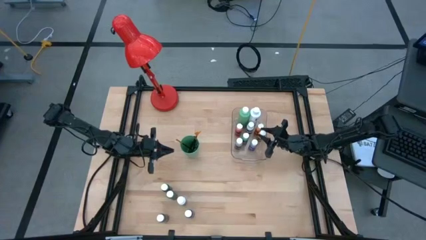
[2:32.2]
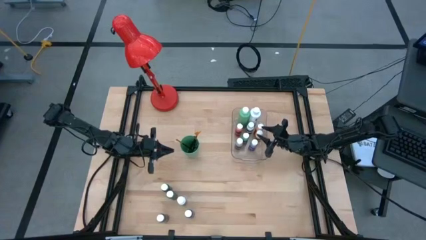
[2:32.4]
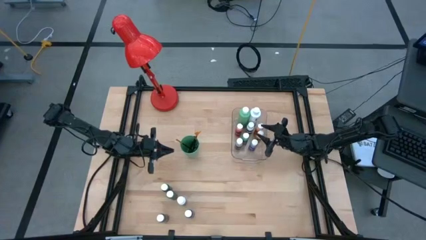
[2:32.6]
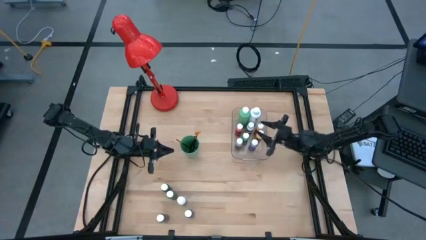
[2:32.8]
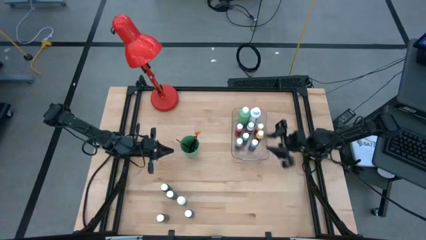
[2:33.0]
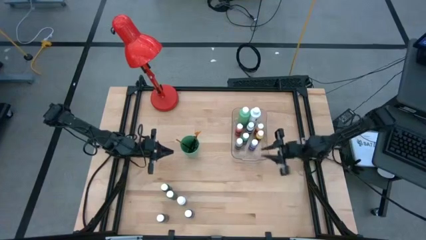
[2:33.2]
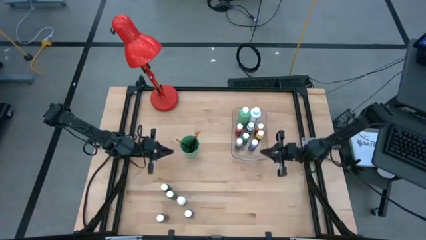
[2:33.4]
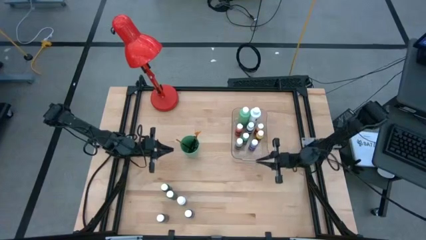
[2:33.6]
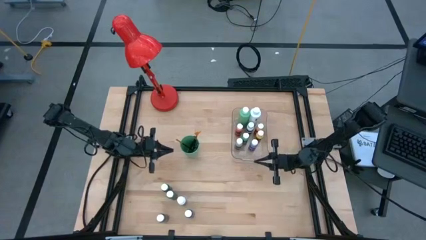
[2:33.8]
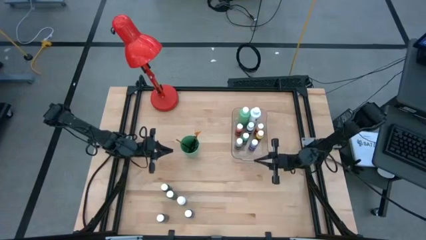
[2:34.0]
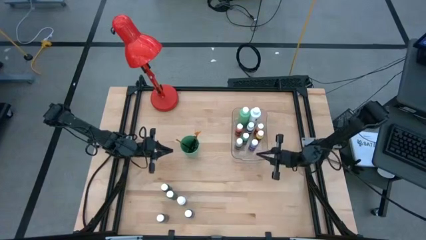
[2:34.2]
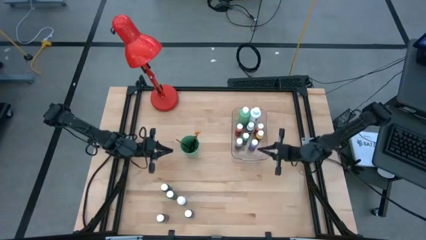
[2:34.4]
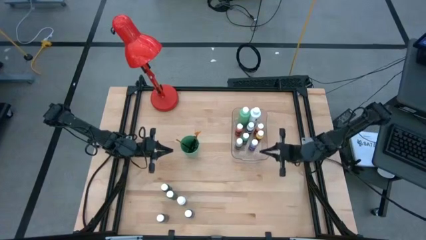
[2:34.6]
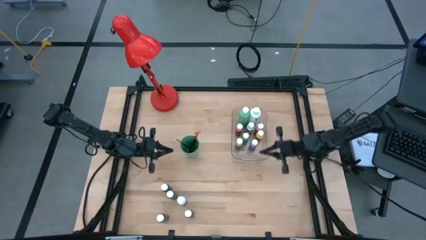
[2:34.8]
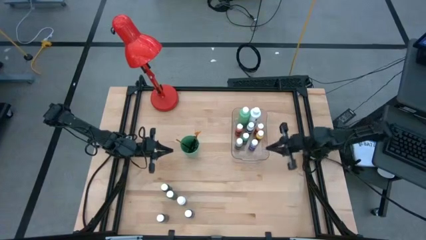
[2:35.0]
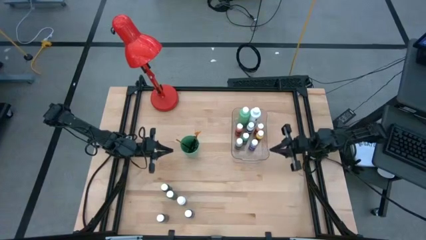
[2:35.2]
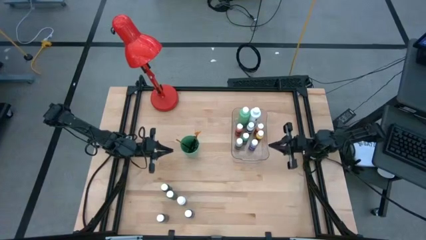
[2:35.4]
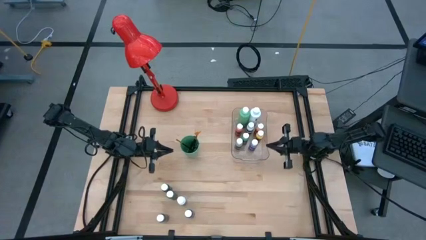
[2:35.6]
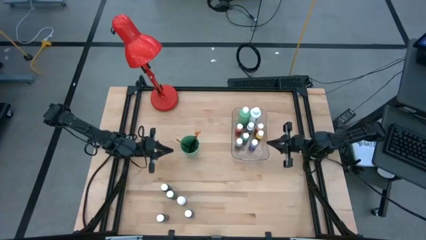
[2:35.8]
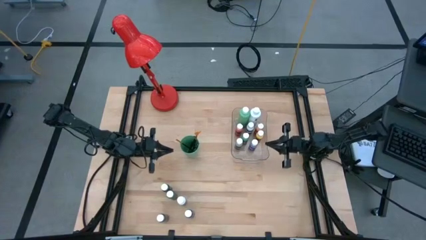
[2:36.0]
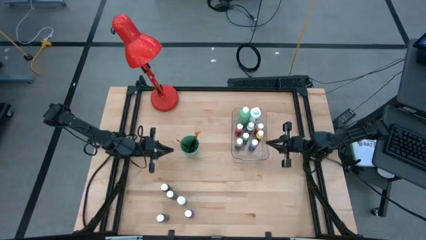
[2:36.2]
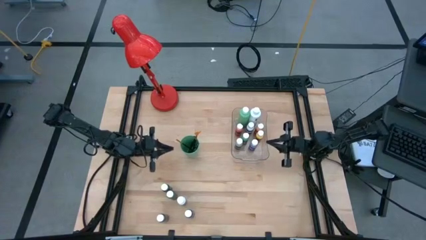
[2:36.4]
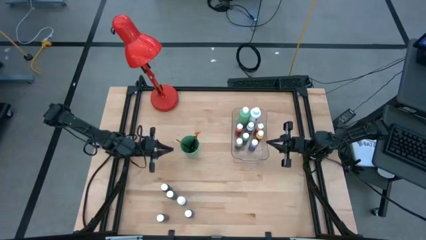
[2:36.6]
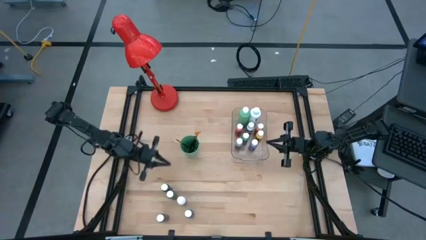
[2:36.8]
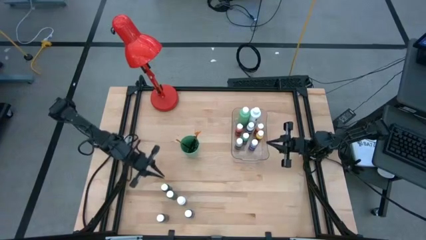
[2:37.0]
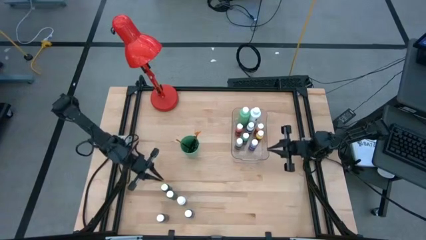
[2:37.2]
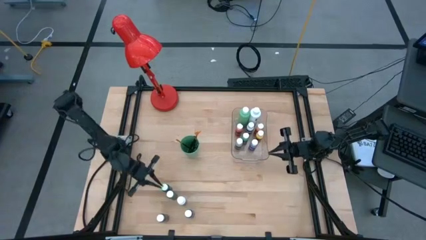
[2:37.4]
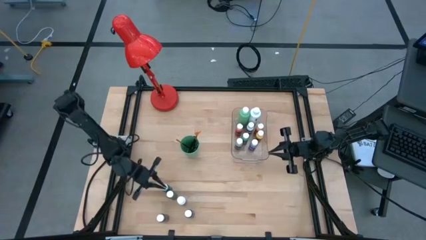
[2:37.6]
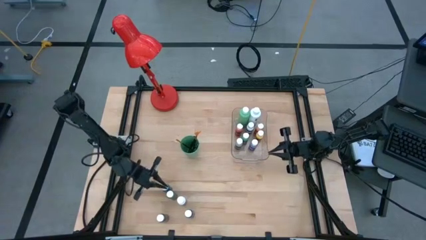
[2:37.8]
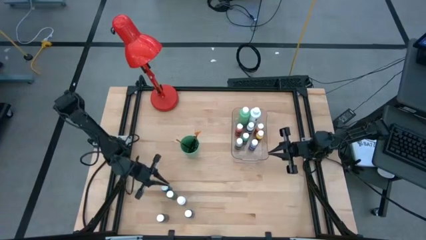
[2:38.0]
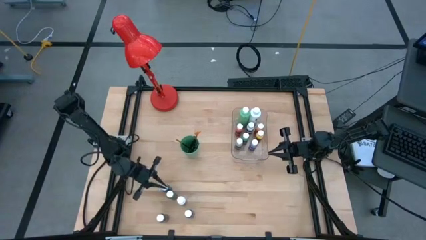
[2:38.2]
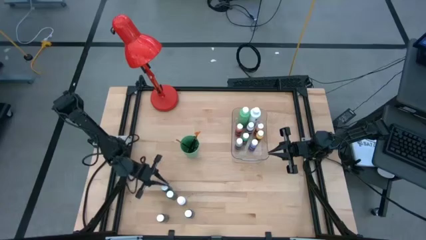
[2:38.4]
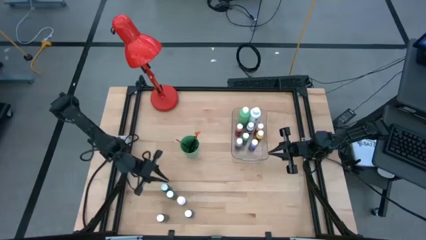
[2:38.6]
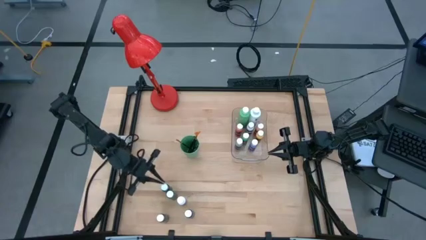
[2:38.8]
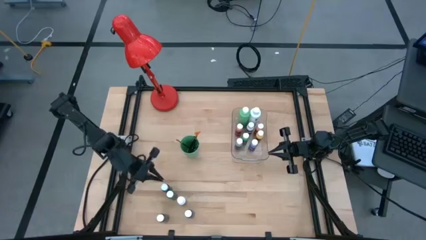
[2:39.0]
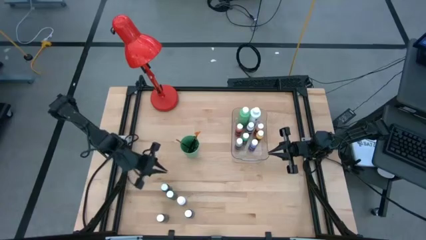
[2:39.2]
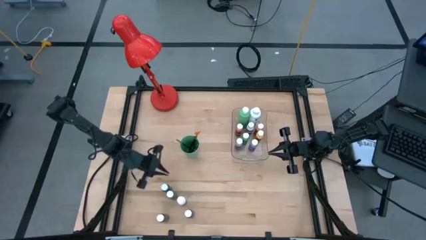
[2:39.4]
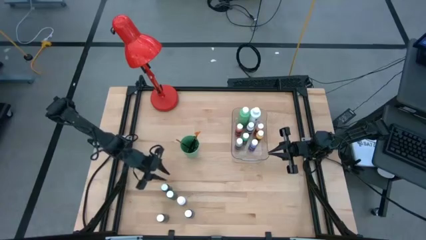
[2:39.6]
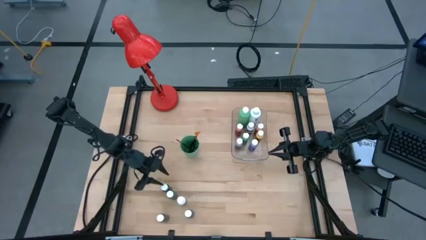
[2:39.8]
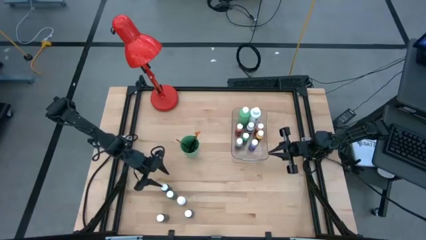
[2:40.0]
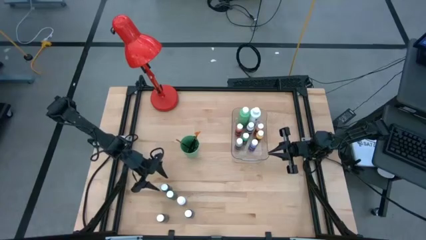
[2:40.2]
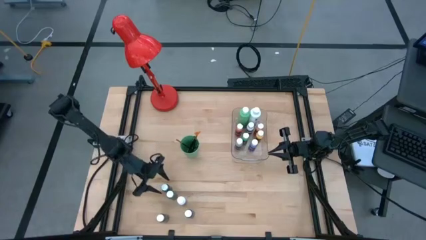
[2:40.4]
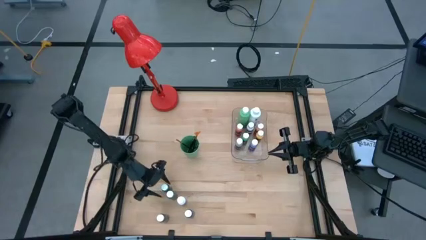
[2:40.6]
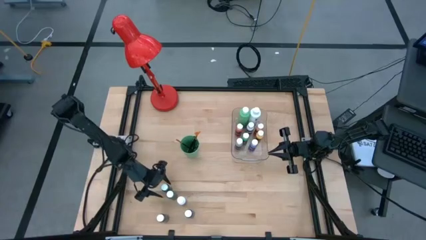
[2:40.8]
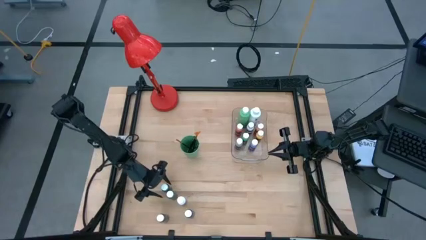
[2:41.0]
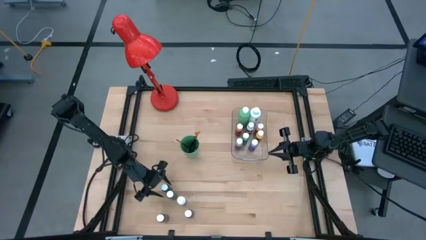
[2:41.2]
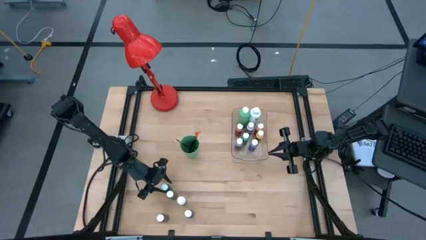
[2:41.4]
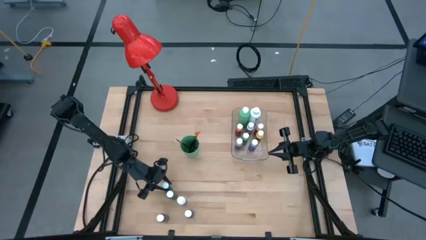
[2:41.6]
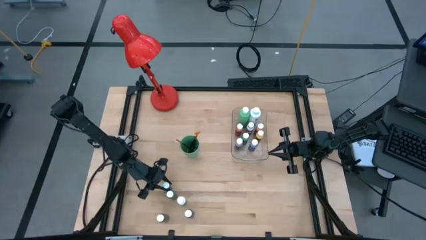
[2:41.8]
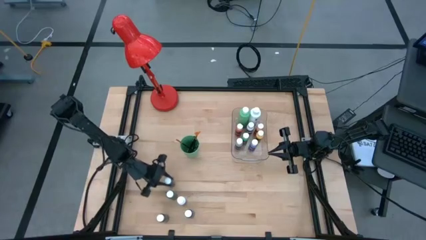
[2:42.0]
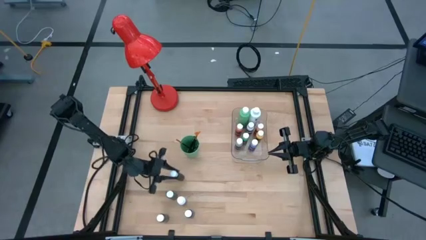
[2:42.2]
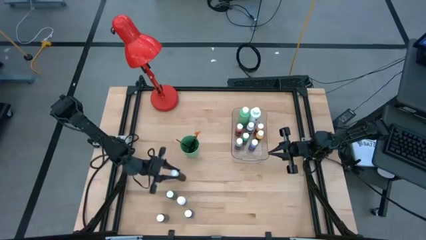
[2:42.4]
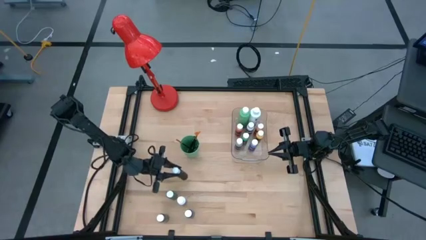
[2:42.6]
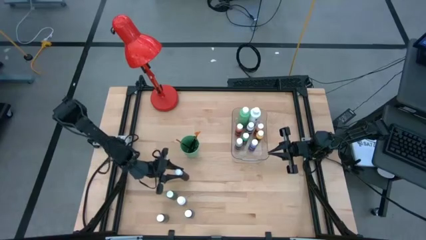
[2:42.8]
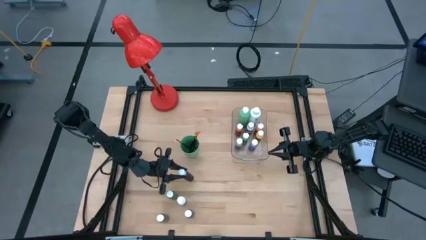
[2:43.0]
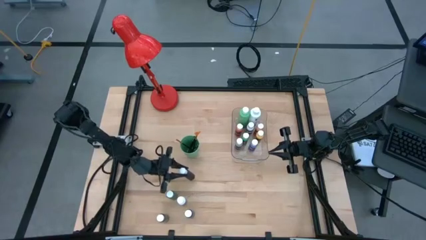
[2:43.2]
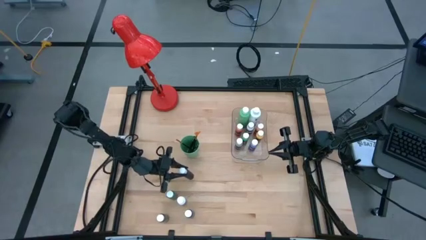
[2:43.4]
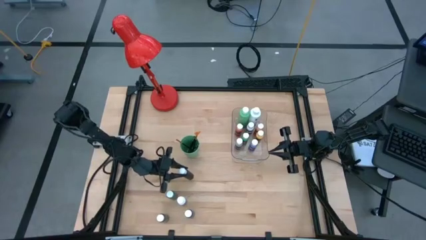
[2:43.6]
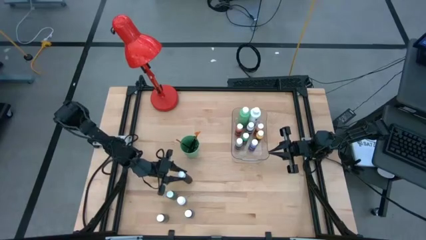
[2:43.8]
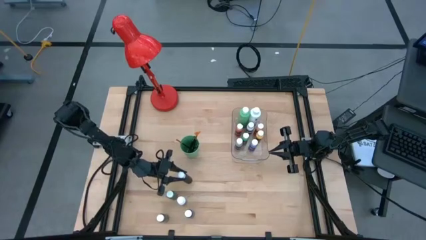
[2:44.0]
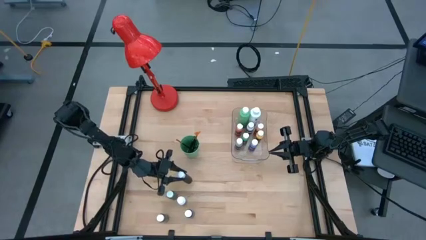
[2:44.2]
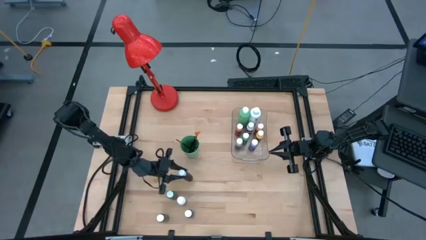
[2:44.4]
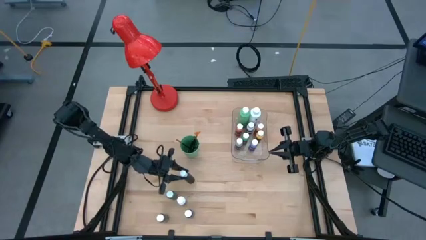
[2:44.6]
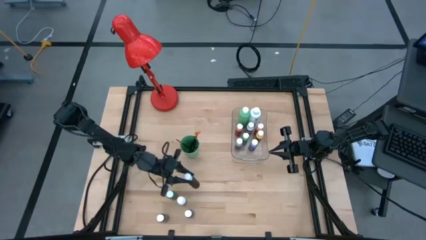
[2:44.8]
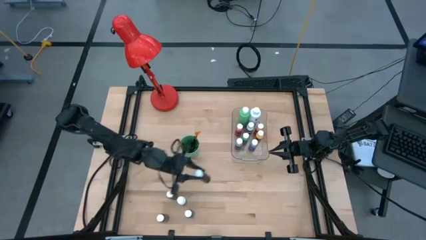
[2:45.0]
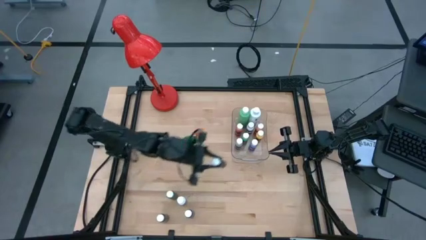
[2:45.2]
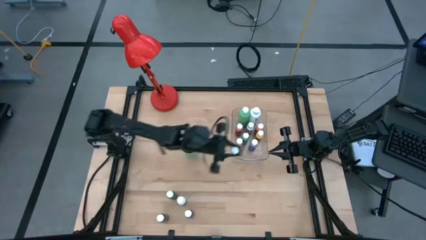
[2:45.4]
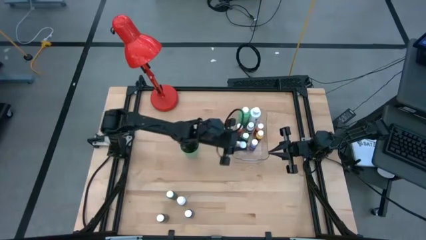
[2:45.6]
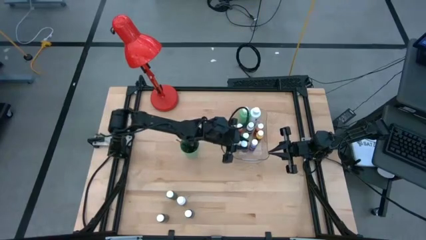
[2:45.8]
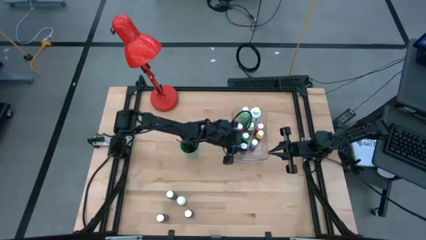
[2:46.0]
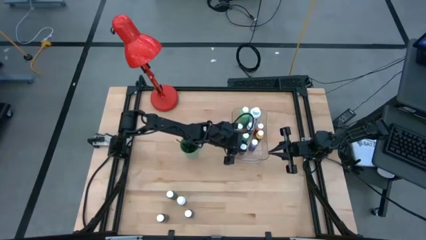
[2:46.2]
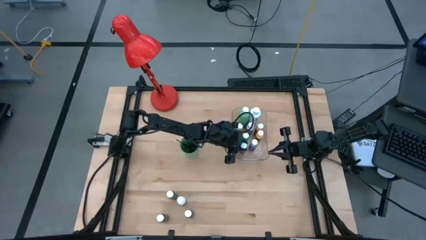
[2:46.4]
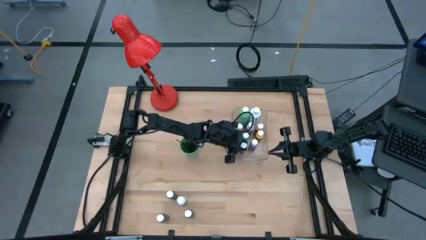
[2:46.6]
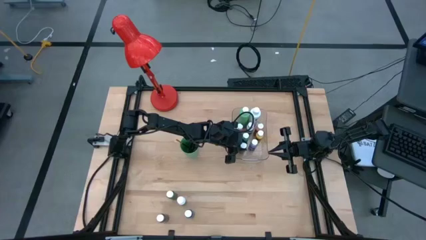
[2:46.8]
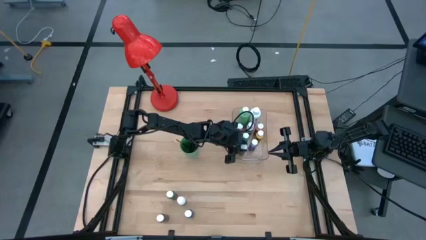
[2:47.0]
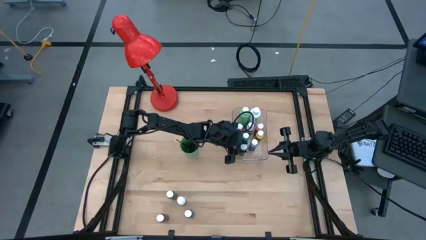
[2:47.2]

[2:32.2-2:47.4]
Task: Pick & Place Paint Supplies
Put the top small black paint bottle into the transparent bin
